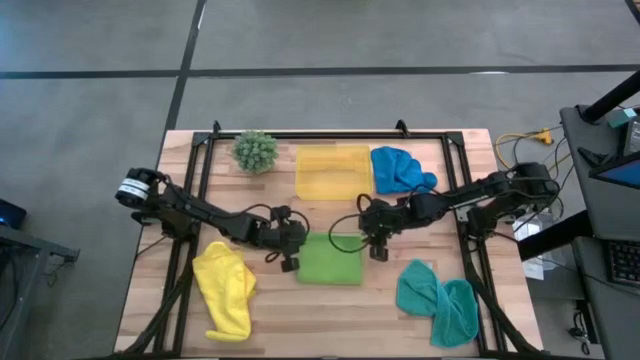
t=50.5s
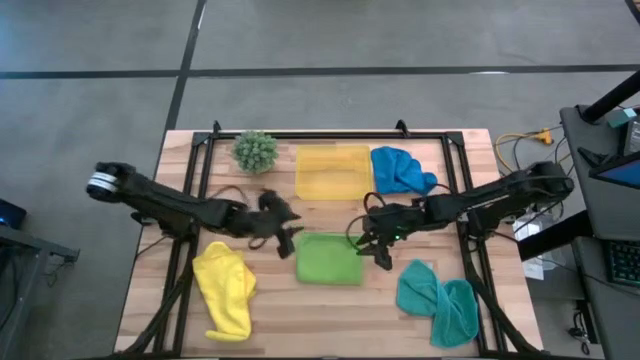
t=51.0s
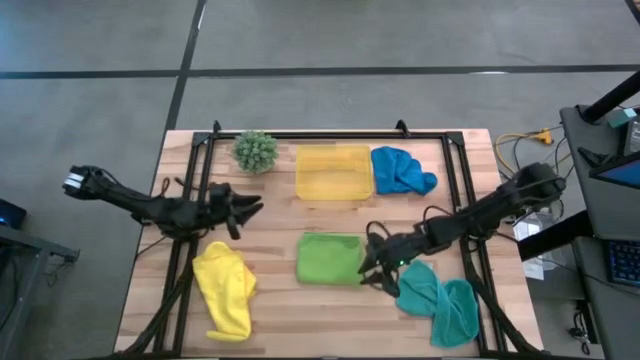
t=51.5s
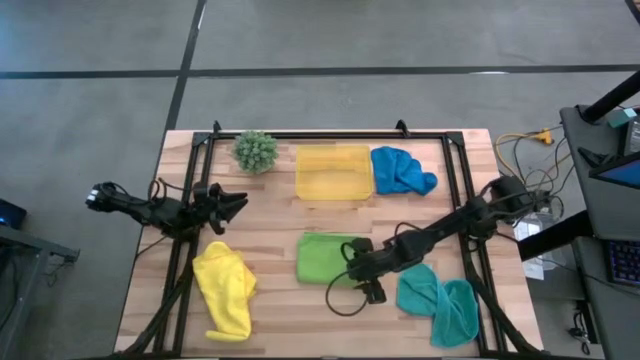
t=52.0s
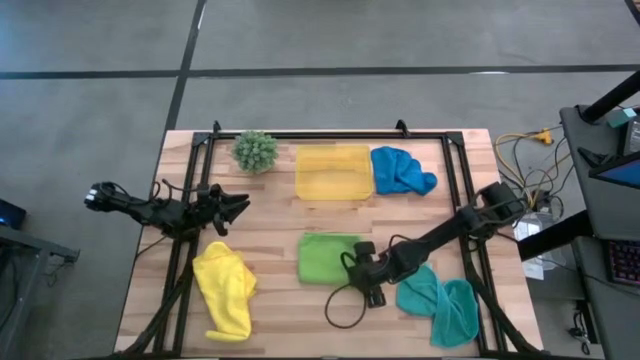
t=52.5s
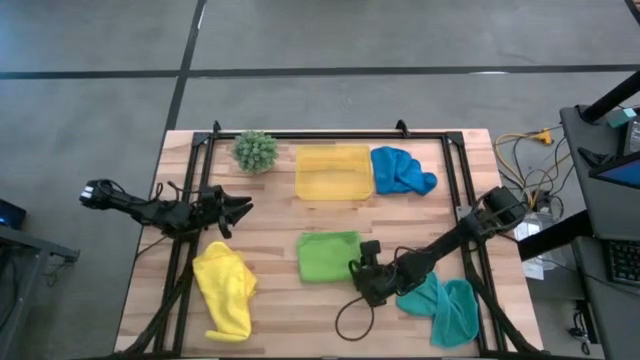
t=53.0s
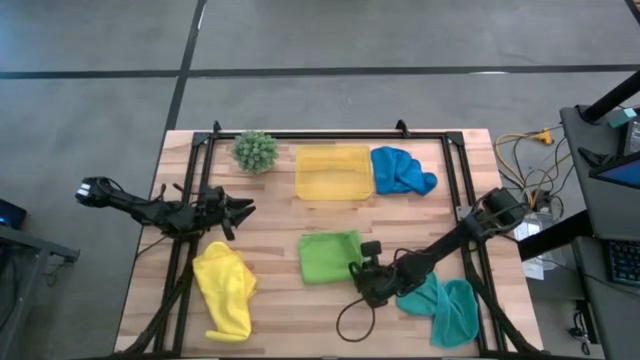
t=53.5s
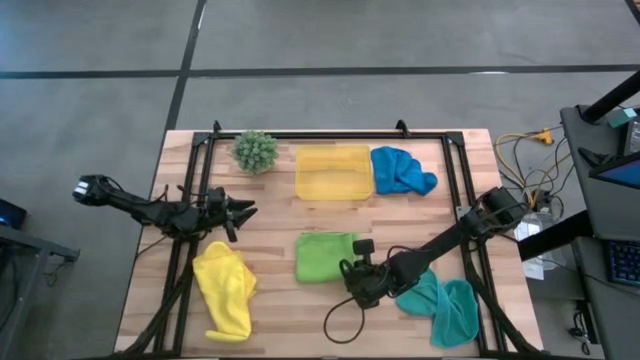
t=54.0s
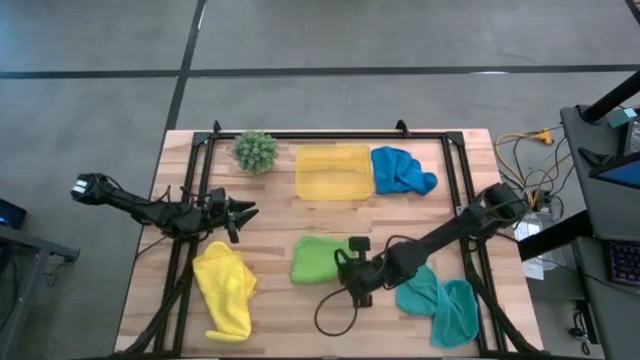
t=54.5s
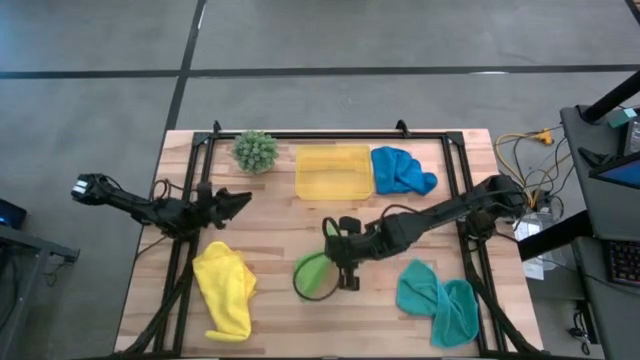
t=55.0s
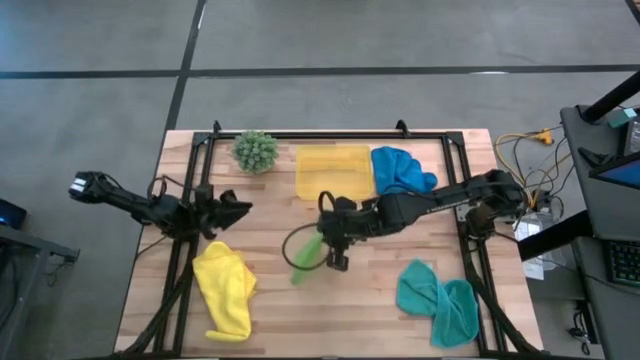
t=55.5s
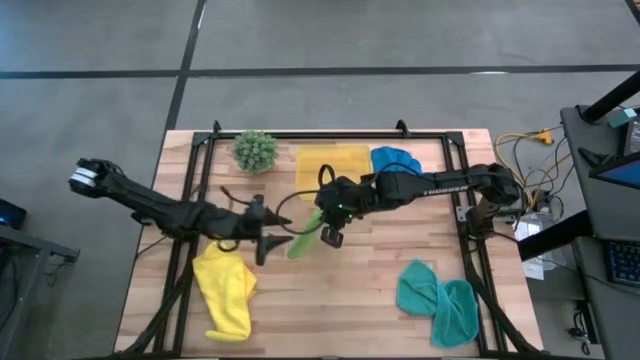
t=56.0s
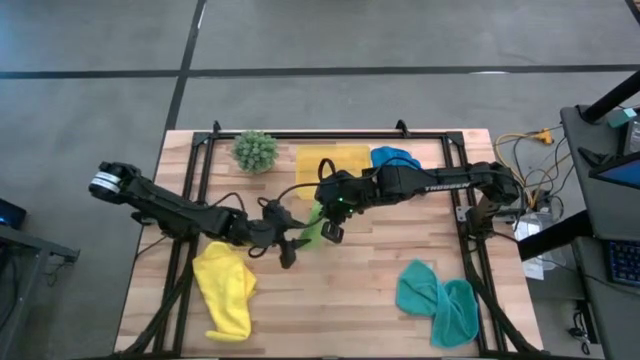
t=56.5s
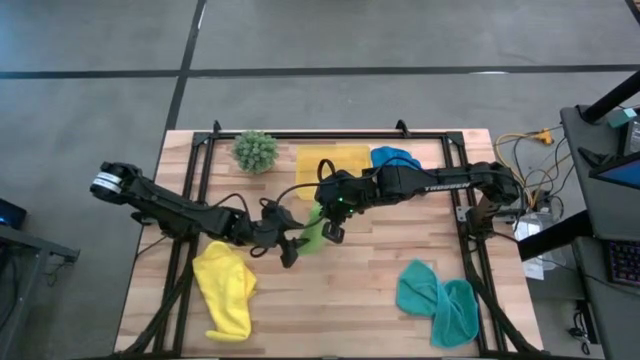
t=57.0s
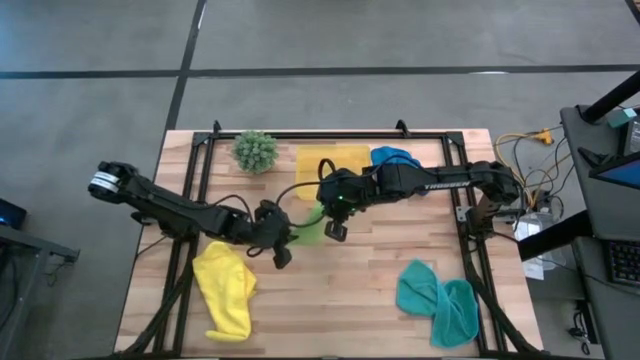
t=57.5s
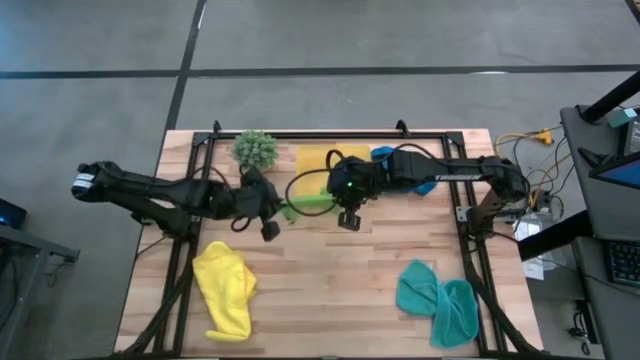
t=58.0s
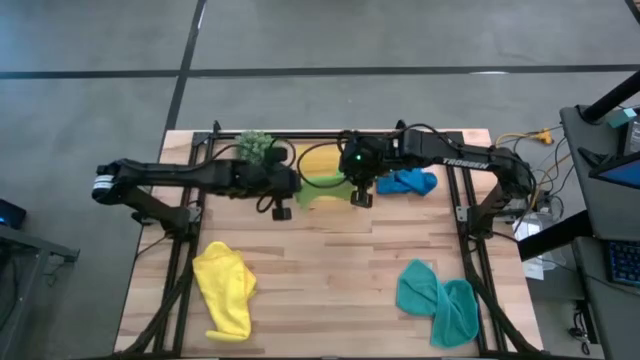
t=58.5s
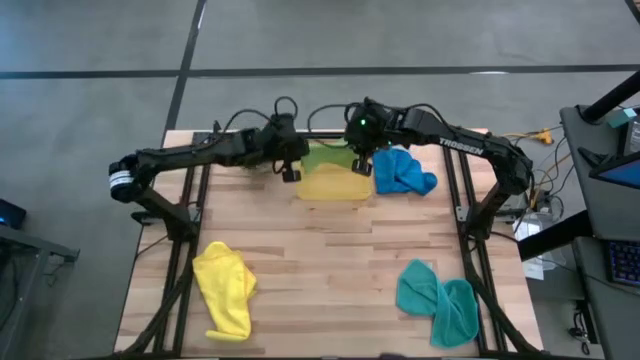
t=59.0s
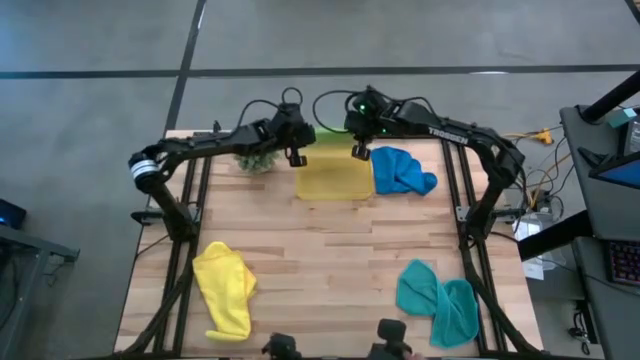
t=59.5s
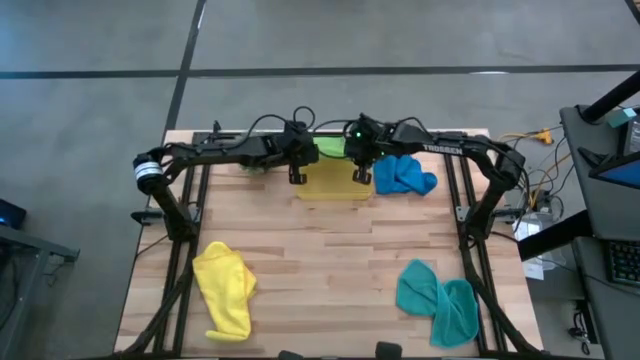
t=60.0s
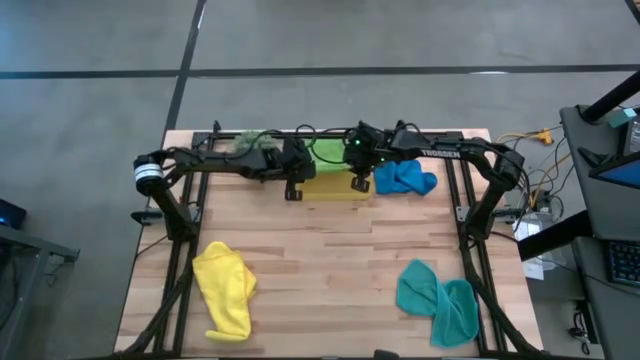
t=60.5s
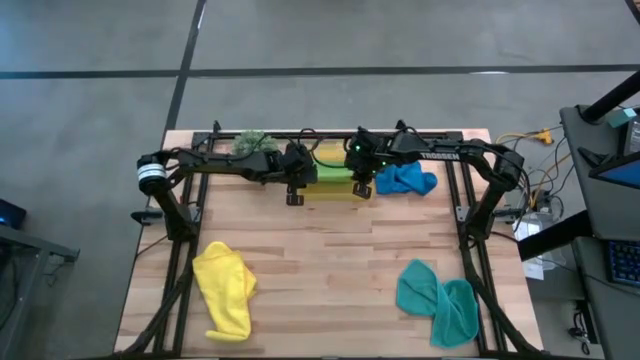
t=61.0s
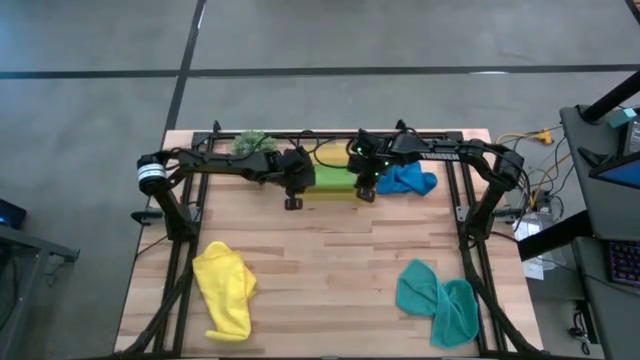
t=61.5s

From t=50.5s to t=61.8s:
Task: Fold microfiber towels
Put the green towel into the yellow bin

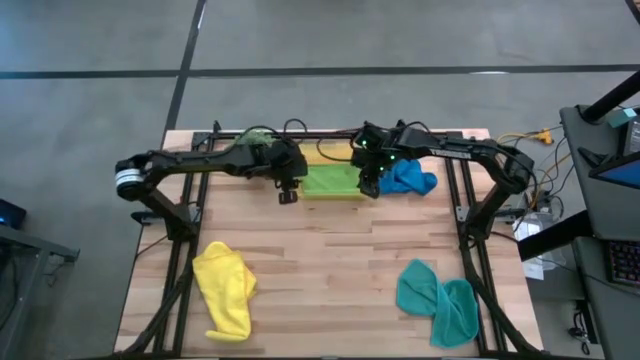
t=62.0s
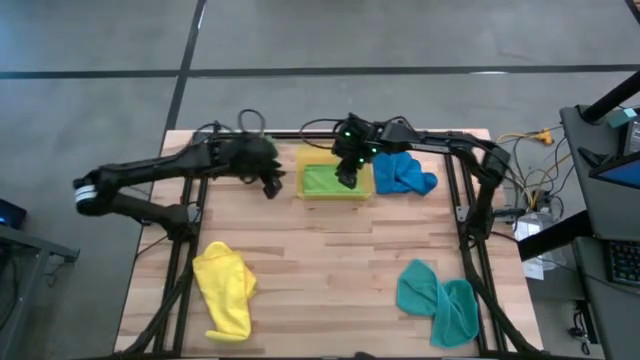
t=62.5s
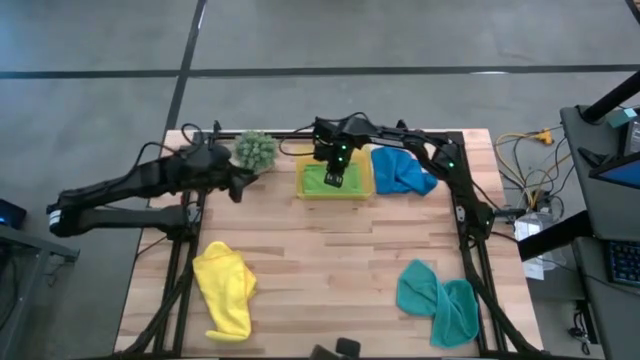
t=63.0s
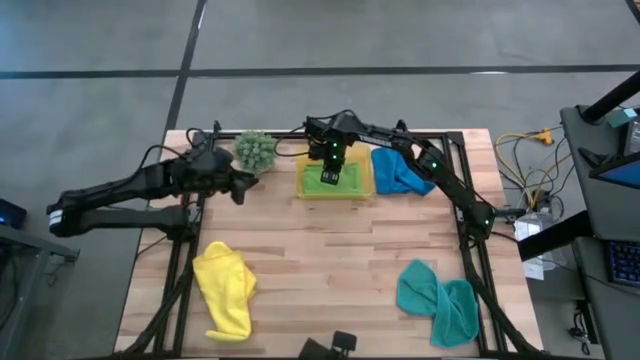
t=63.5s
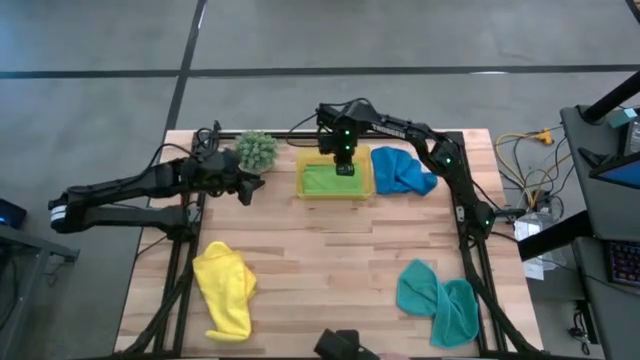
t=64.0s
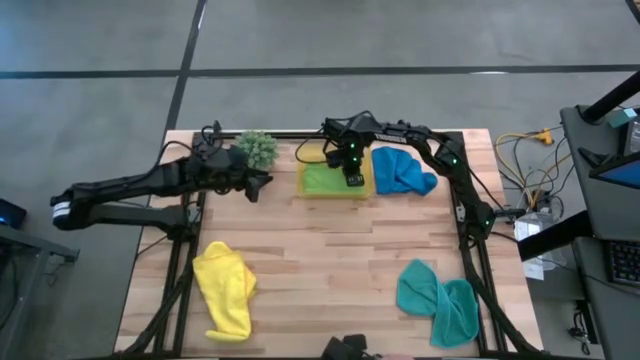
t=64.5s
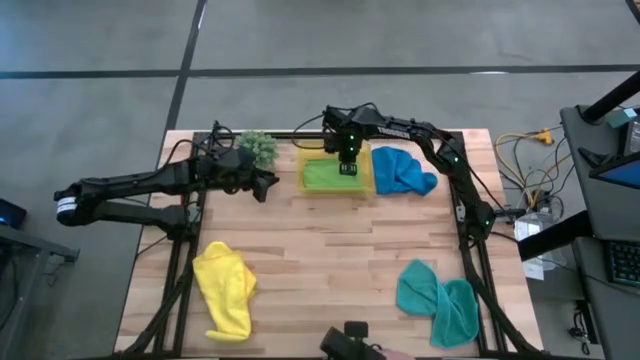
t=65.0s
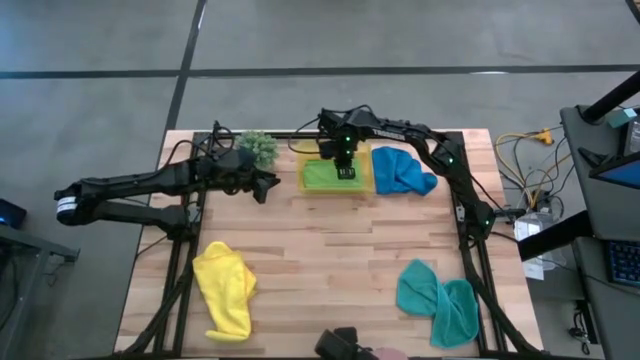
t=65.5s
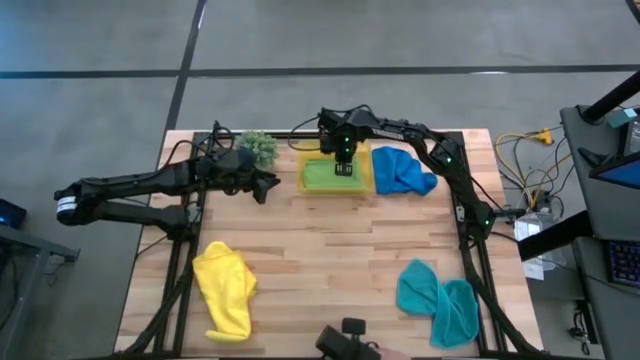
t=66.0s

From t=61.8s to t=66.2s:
Move the yellow bin to the top of the table

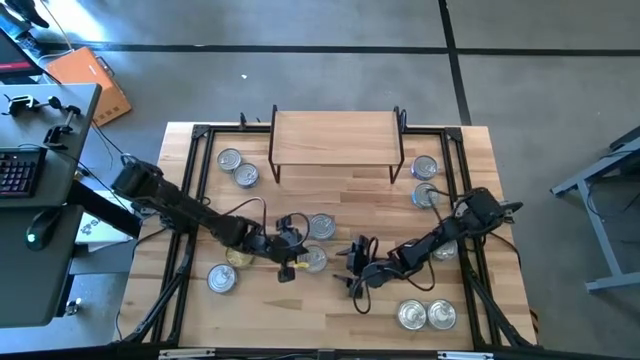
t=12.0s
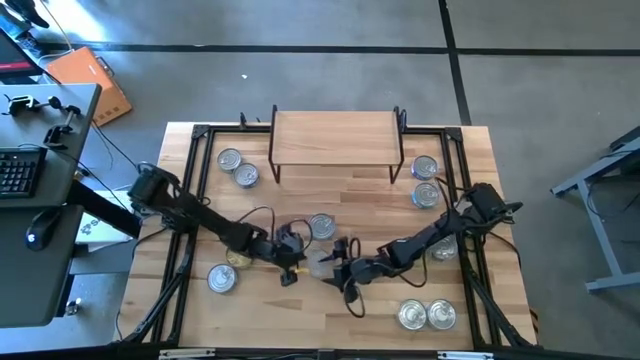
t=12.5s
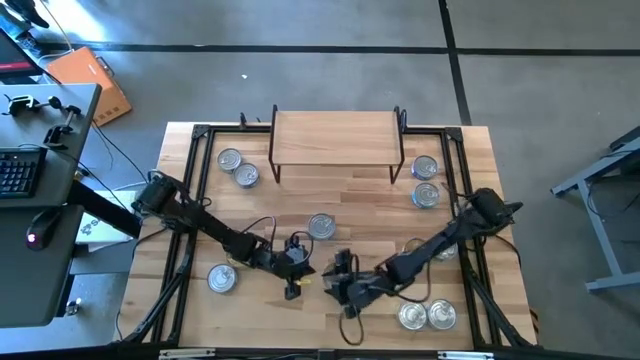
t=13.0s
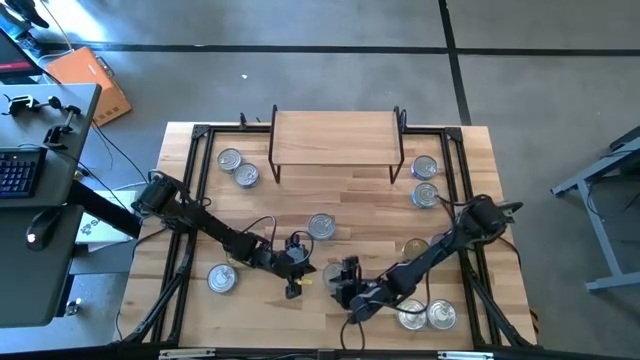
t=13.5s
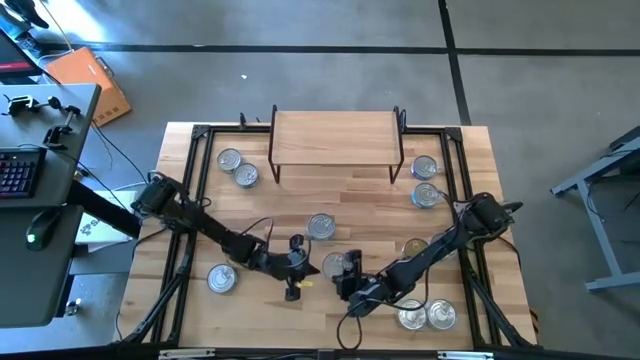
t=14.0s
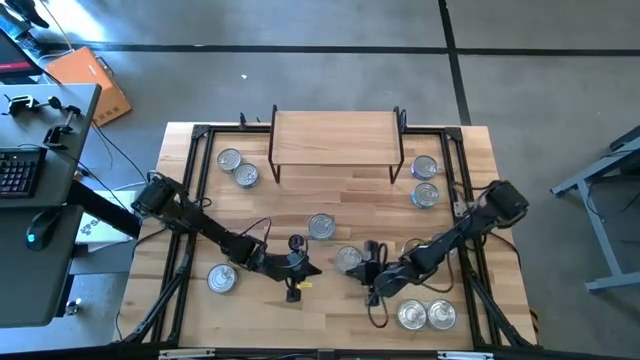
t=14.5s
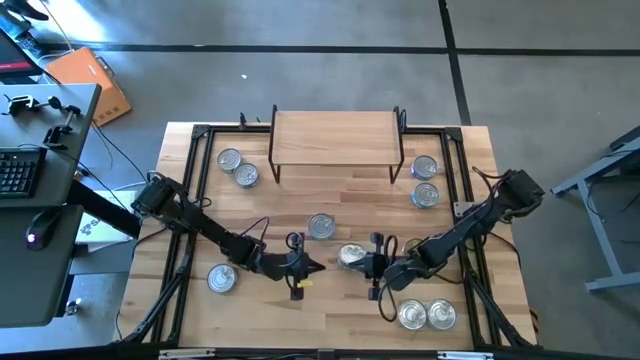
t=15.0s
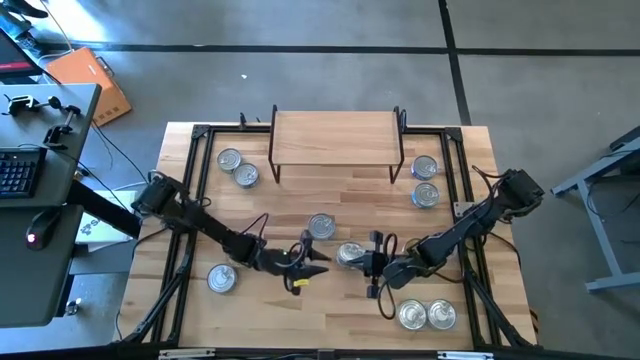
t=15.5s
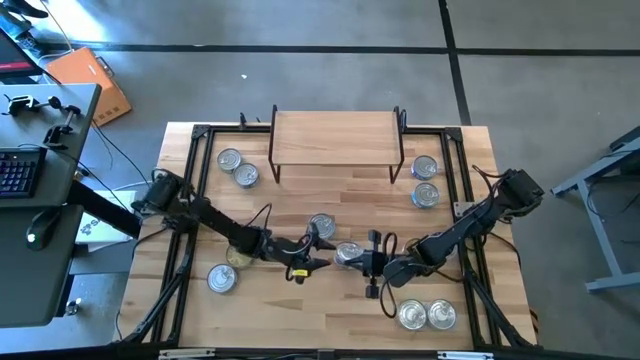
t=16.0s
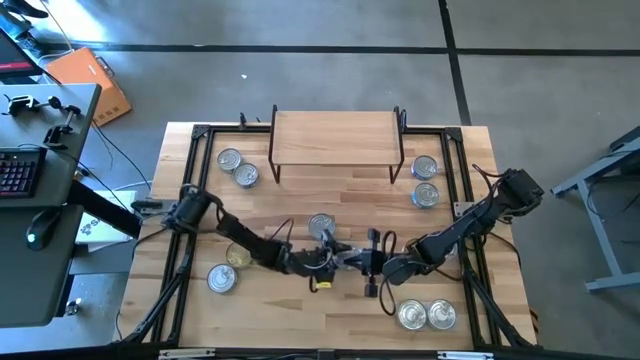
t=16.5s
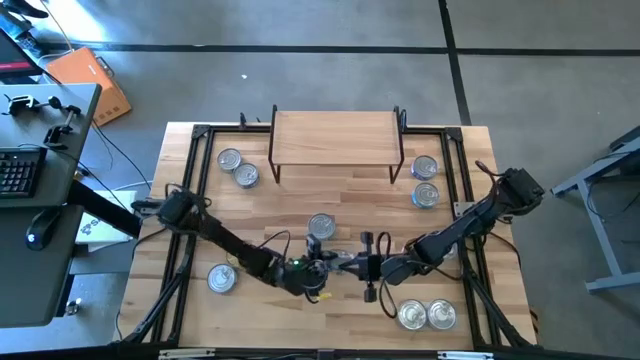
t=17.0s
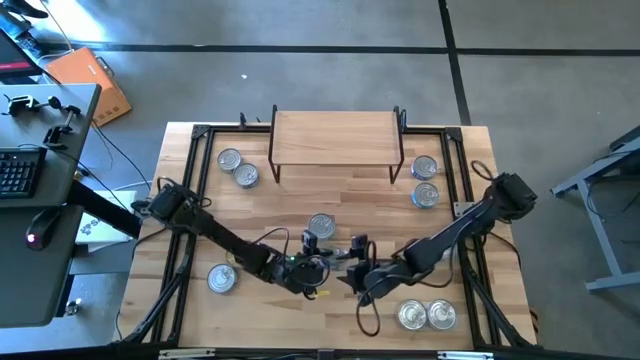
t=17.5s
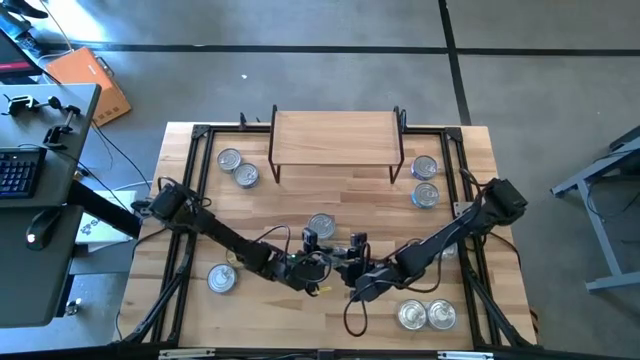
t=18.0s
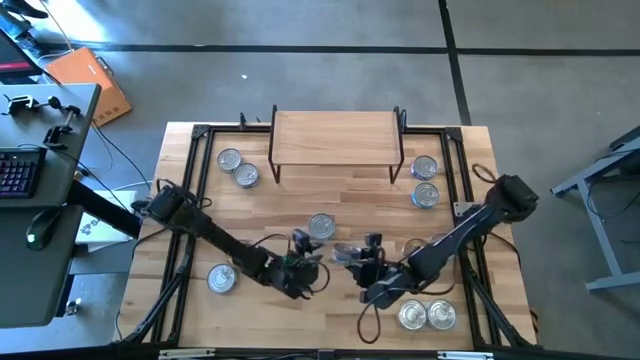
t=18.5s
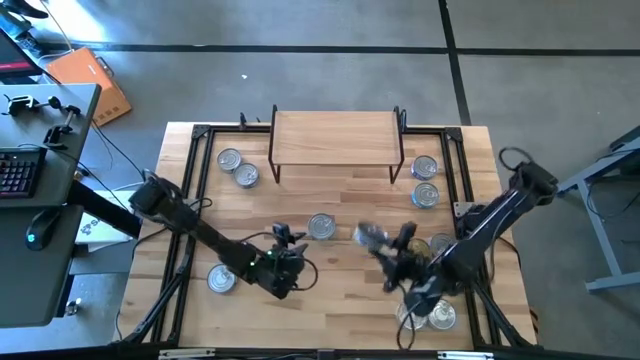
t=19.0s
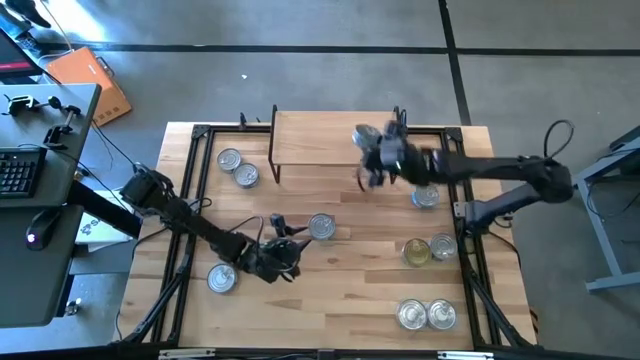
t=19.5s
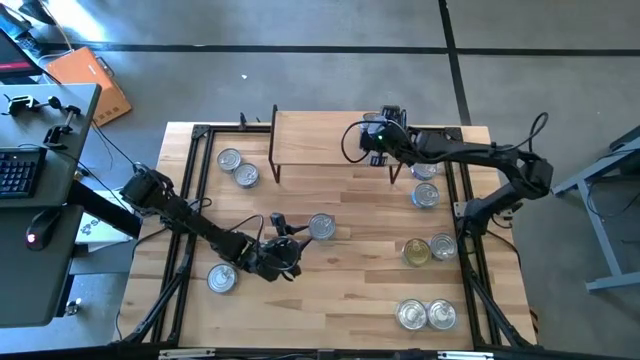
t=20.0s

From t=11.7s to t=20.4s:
Task: Stack canned seafood by type on shelf
Put the green tuna can on the shelf
